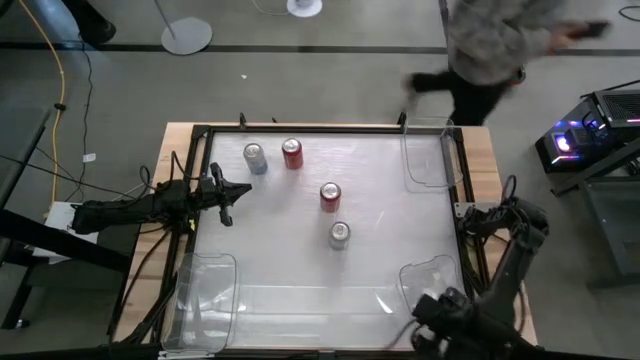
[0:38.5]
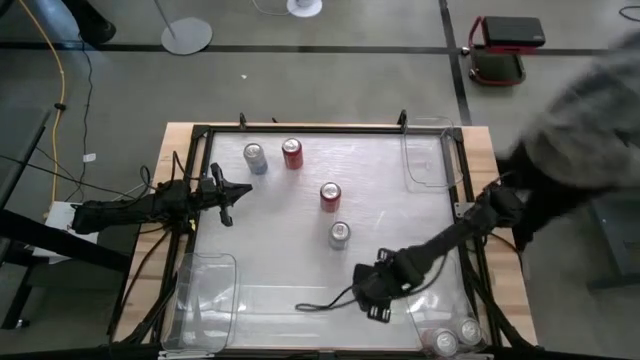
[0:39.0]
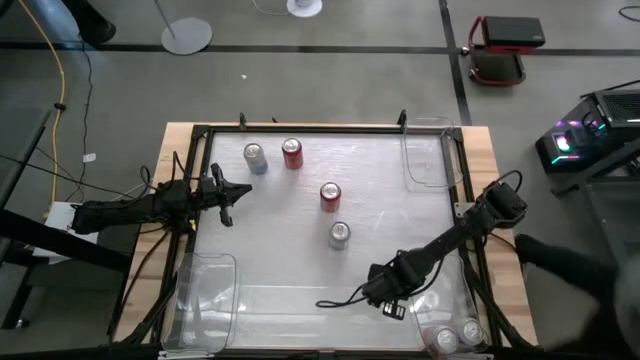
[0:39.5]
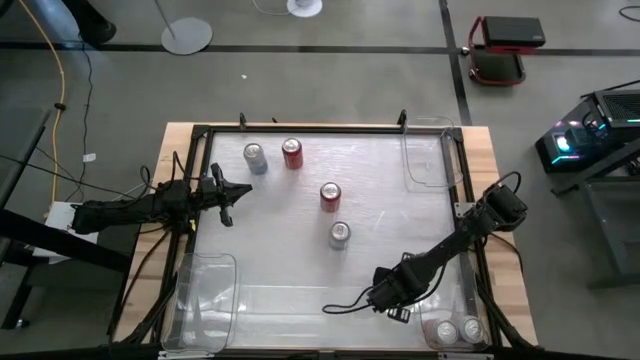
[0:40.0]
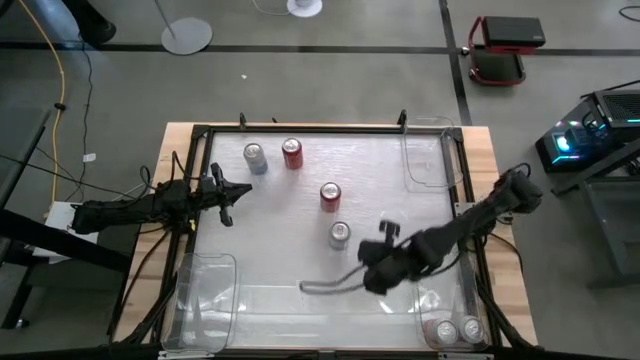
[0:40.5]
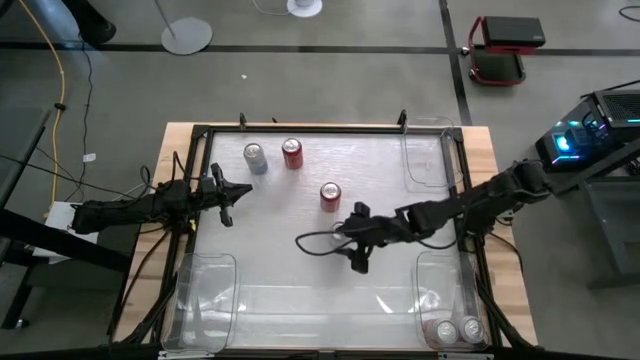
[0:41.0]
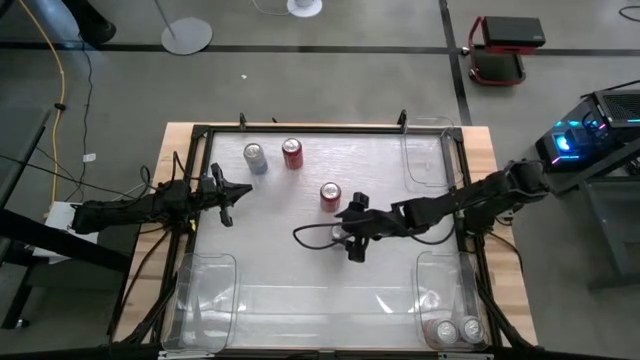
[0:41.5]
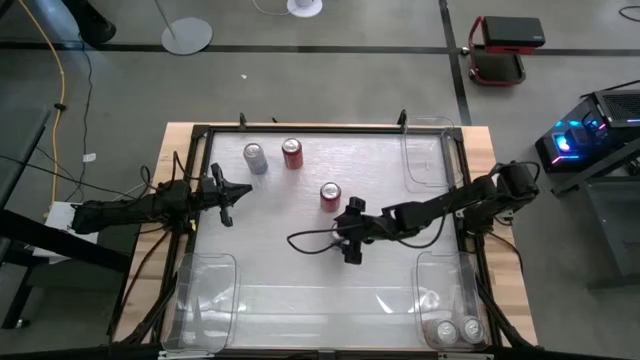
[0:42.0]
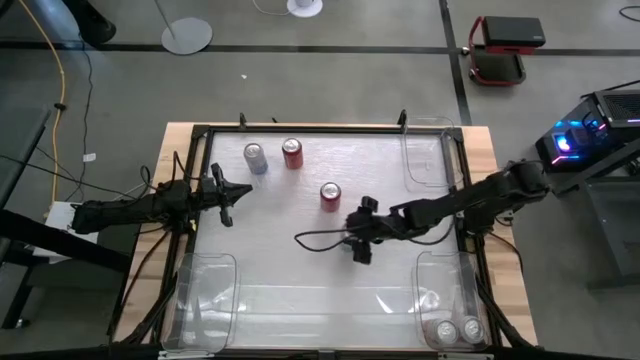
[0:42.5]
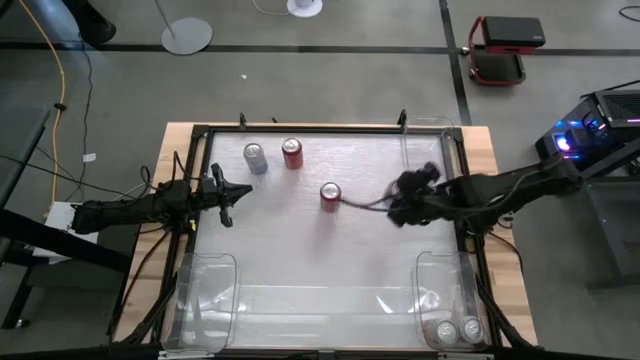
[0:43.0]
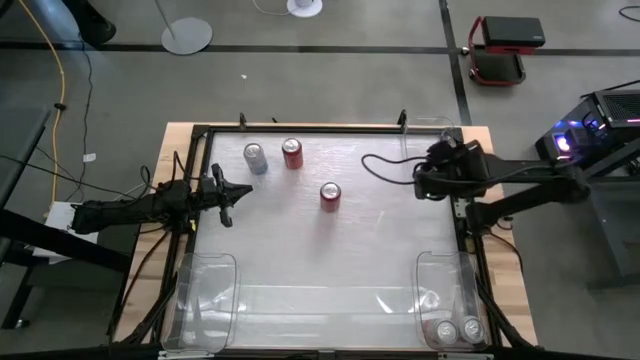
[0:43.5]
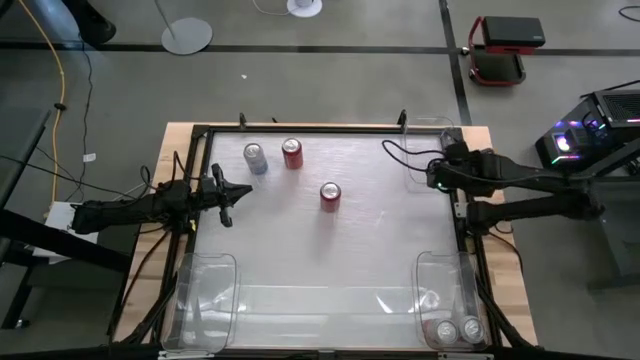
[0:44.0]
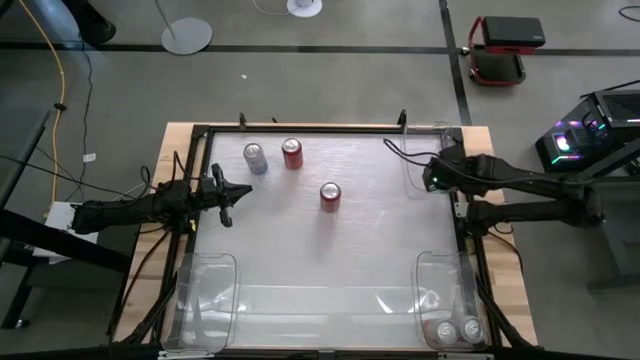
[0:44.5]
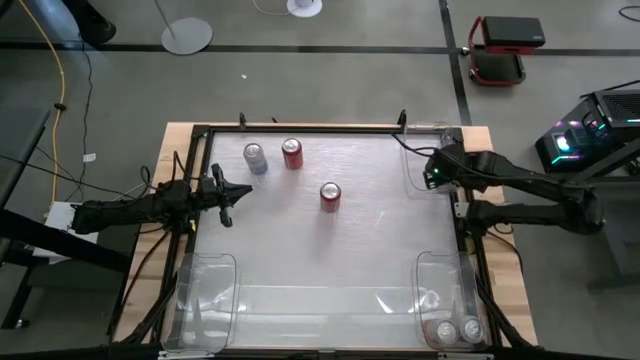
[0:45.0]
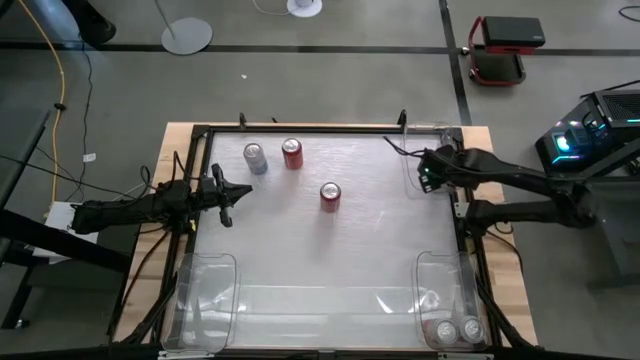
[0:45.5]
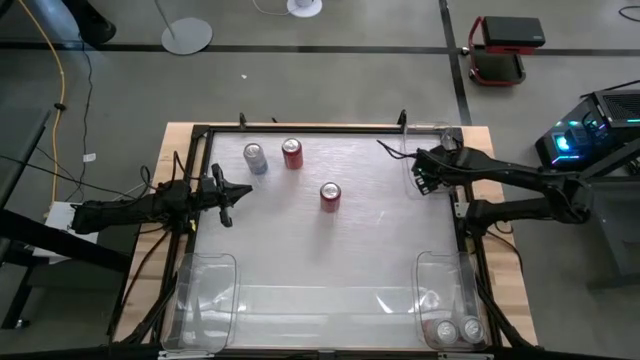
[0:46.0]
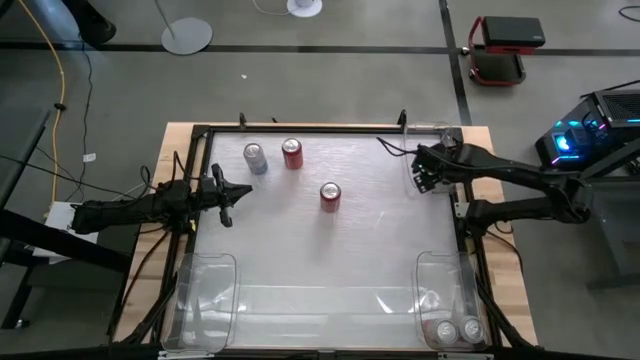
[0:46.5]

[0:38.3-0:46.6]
Task: Sort soda cans
Put the bottom blue-white soda can into the top transparent bin

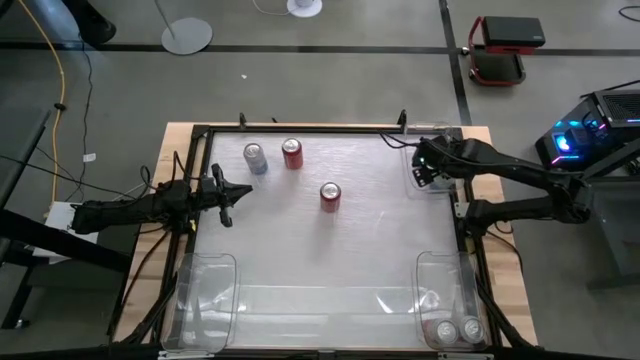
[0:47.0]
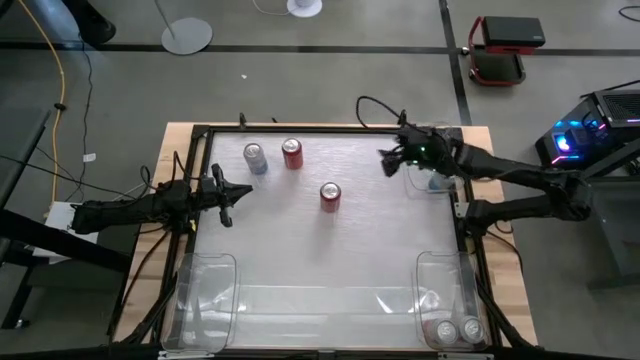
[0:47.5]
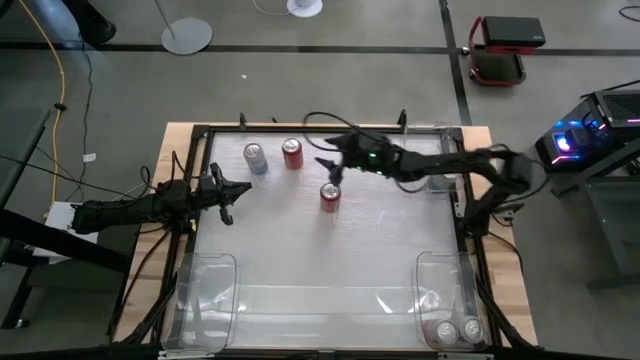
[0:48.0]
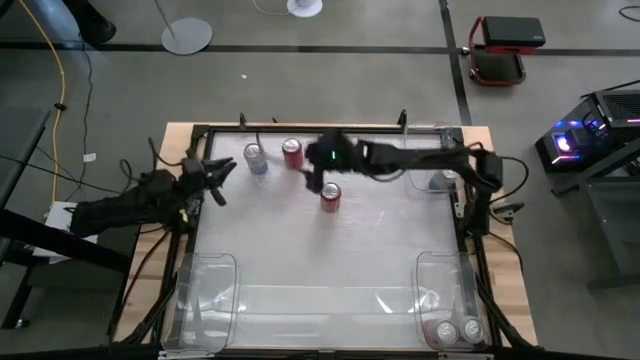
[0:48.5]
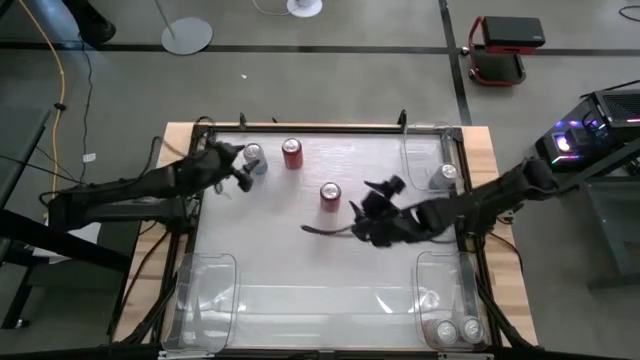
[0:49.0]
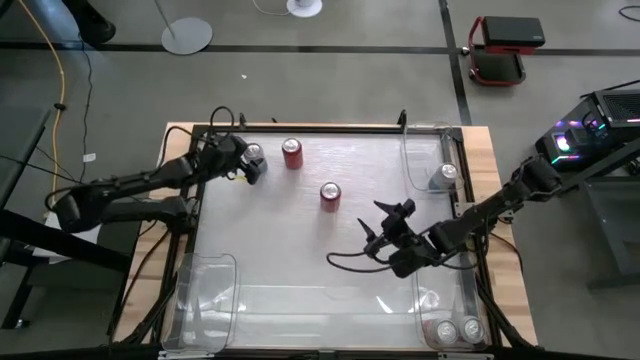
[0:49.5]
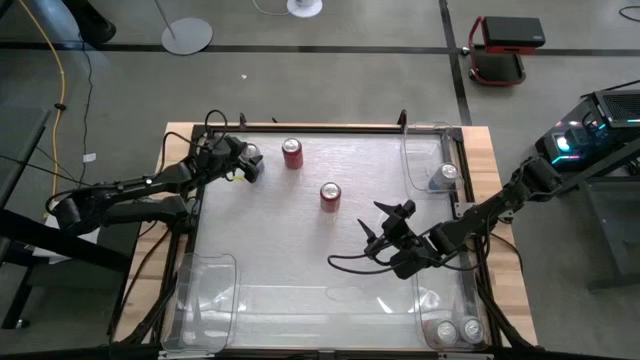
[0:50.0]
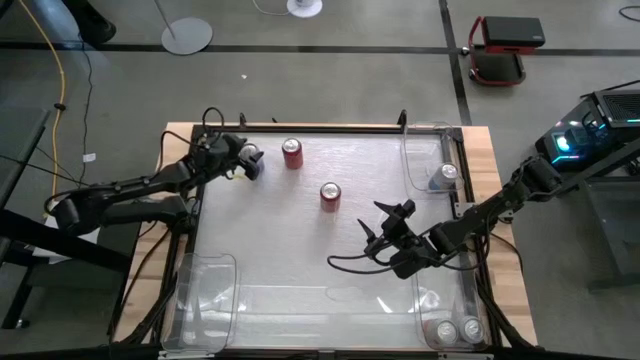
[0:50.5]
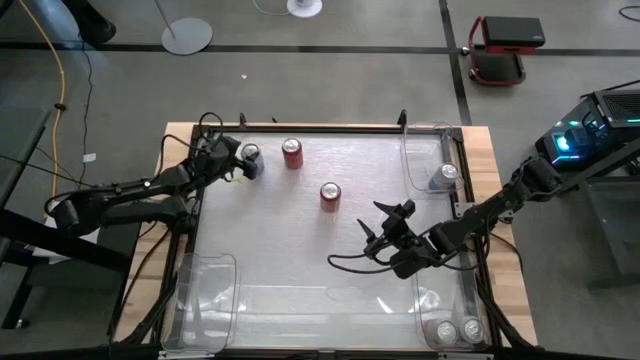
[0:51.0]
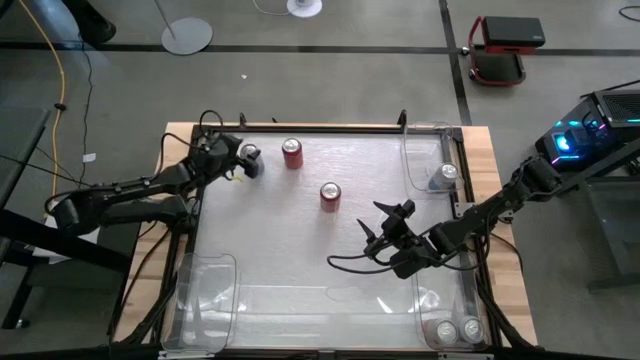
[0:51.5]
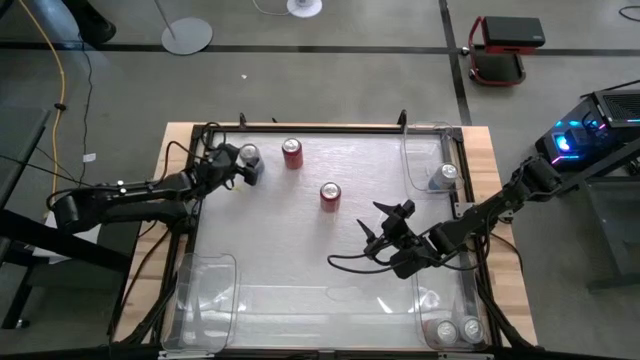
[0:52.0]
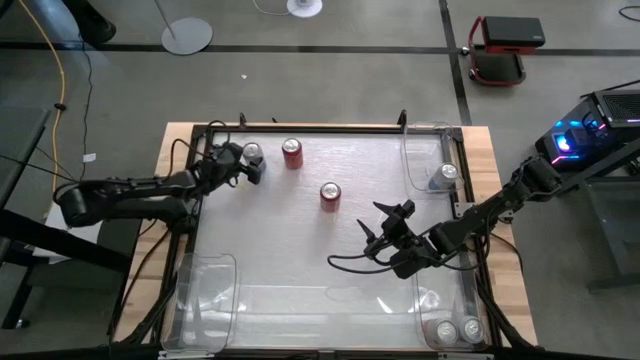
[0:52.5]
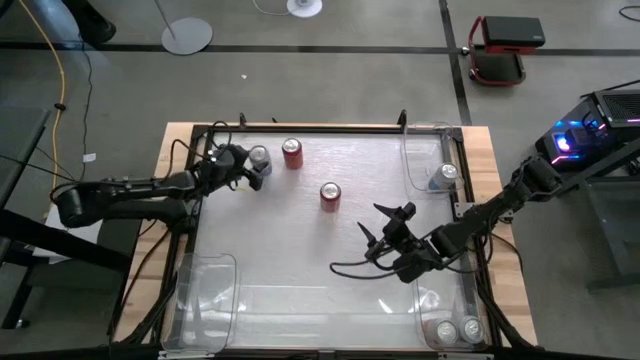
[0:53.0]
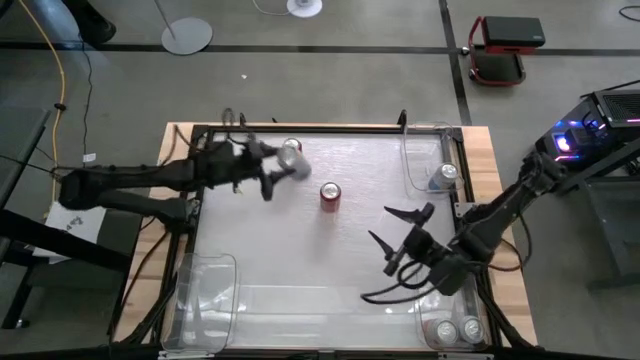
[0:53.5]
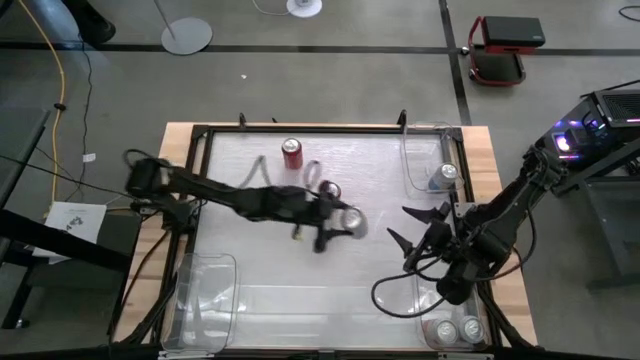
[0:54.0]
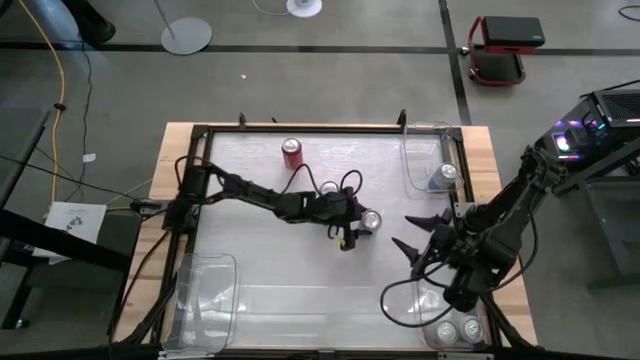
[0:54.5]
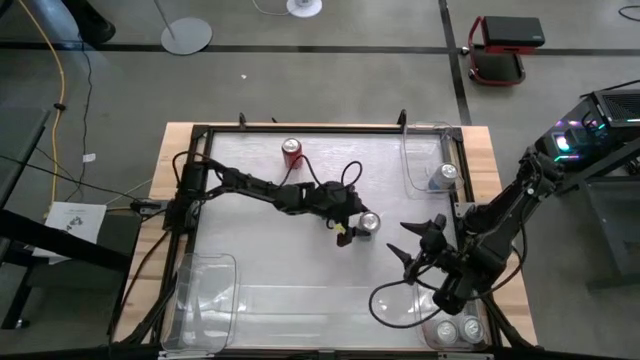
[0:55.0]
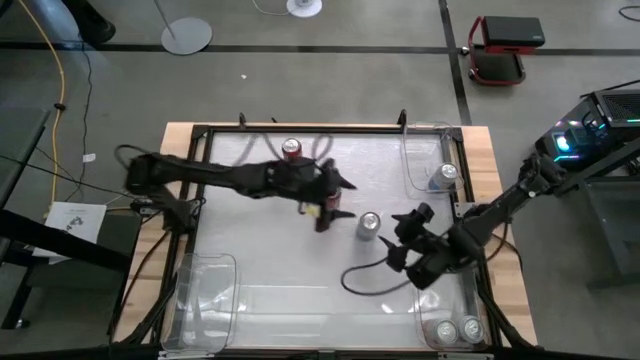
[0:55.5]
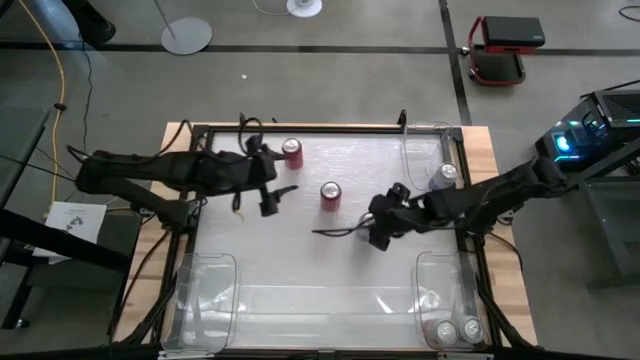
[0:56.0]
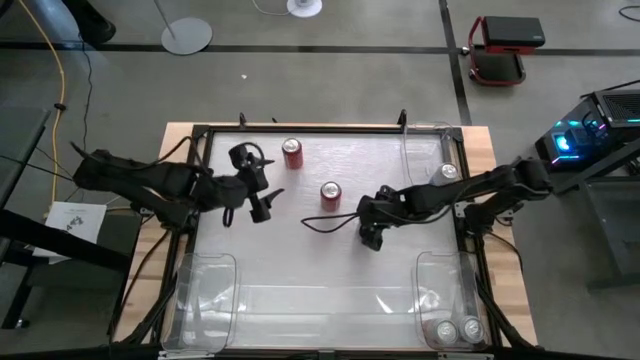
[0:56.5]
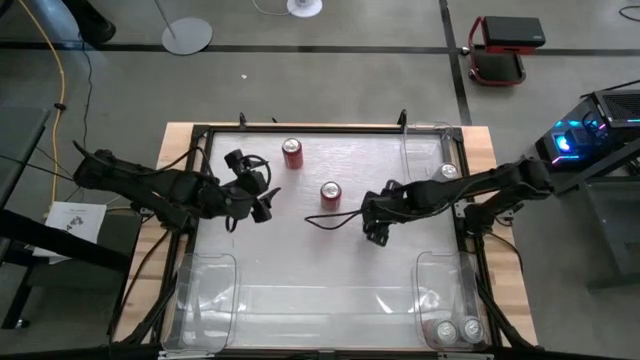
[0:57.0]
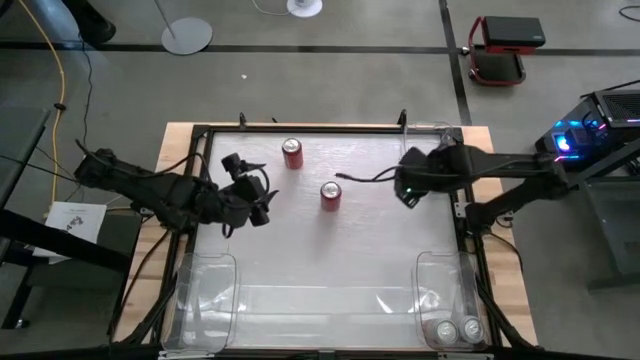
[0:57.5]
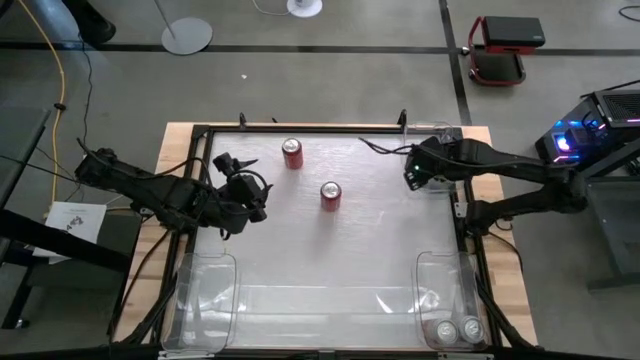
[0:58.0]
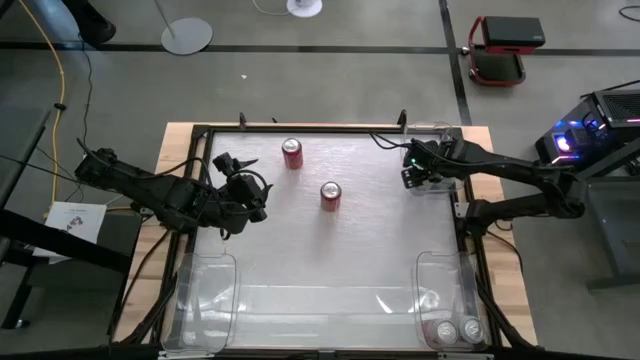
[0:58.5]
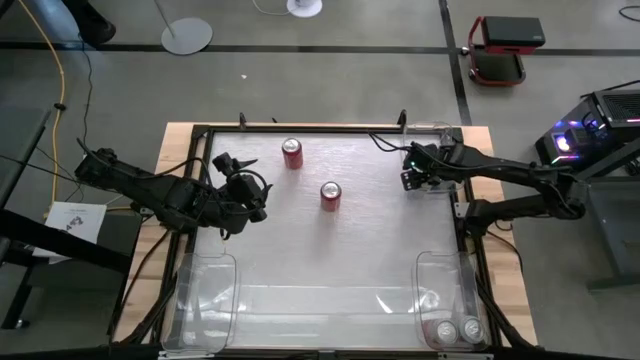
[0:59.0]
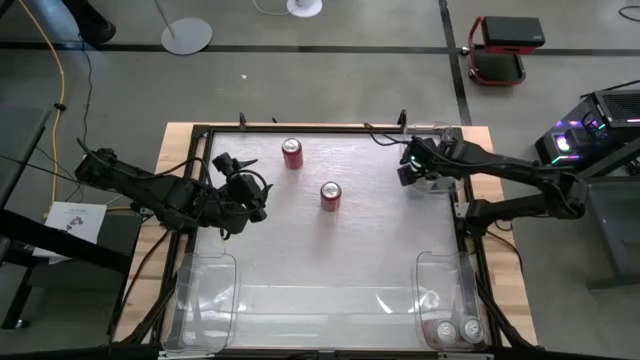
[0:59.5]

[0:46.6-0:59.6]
Put the blue-white soda can into the top transparent bin
